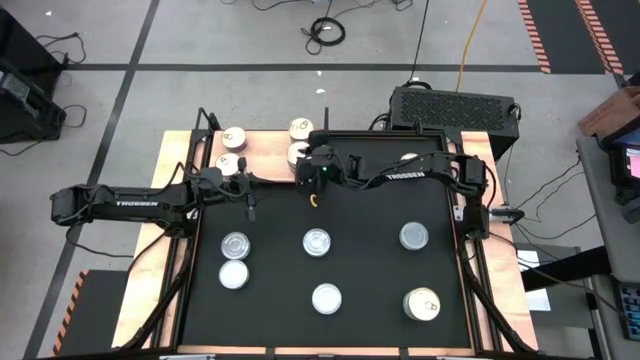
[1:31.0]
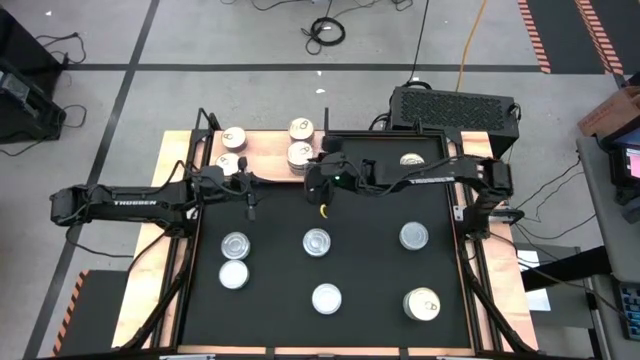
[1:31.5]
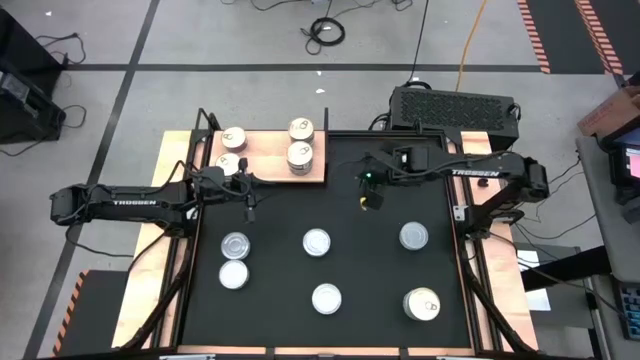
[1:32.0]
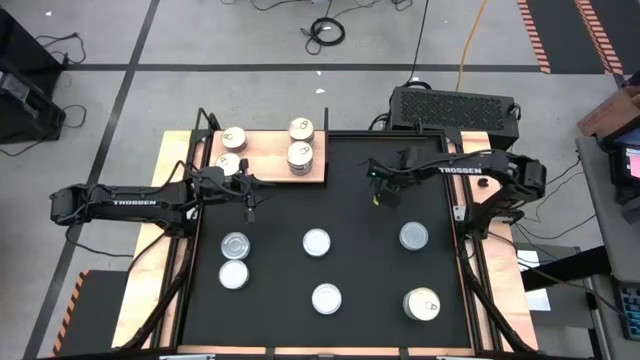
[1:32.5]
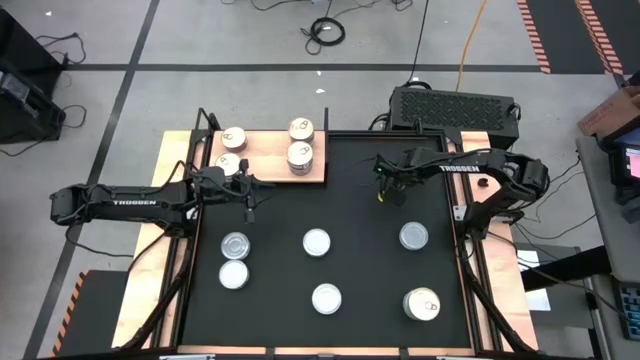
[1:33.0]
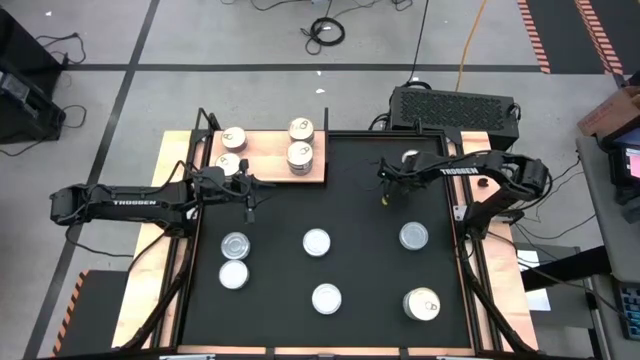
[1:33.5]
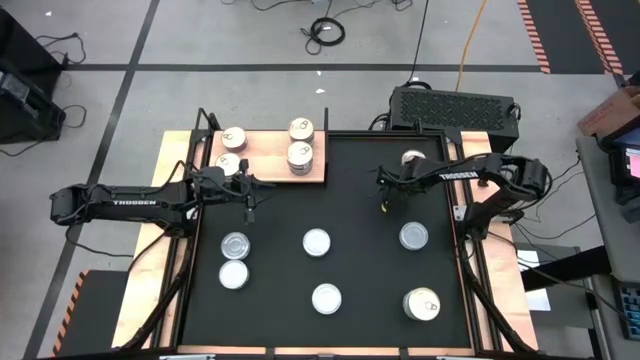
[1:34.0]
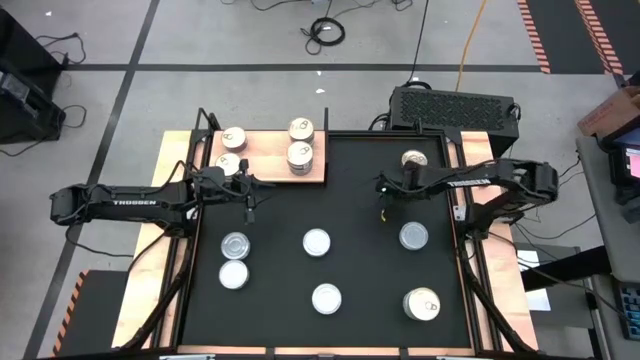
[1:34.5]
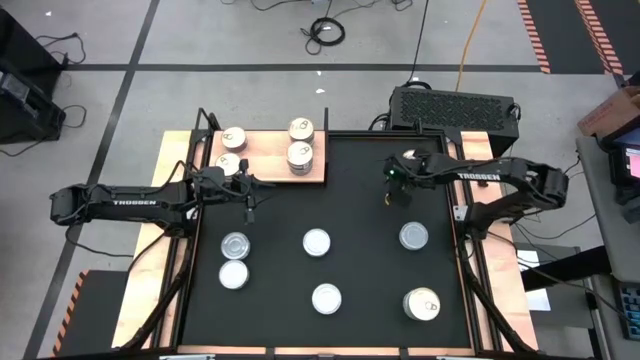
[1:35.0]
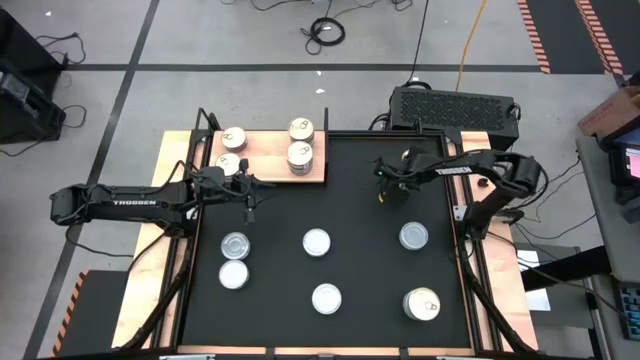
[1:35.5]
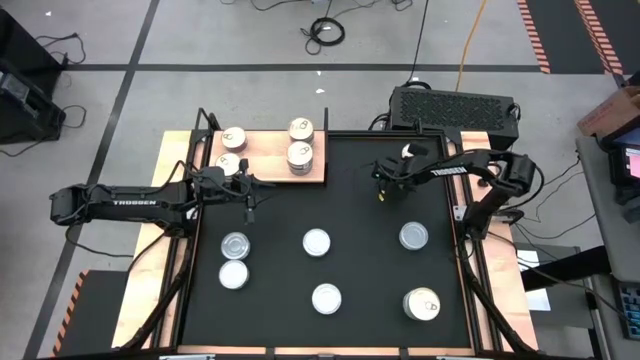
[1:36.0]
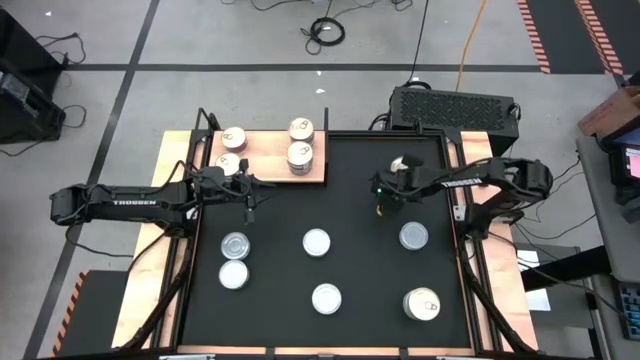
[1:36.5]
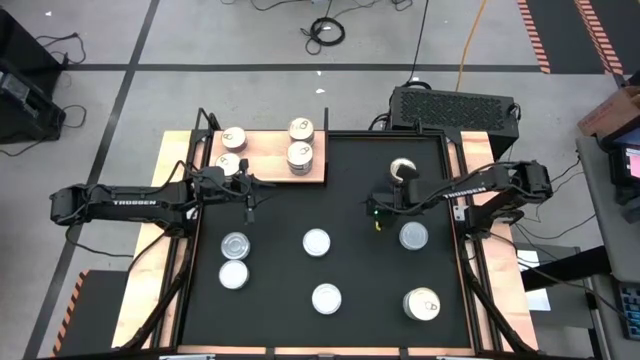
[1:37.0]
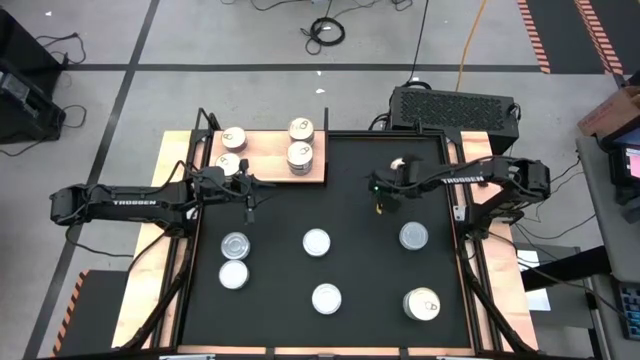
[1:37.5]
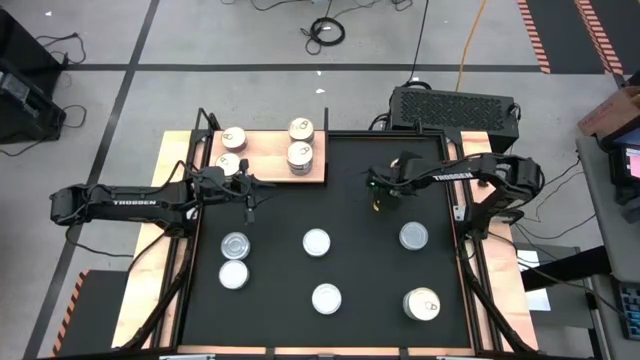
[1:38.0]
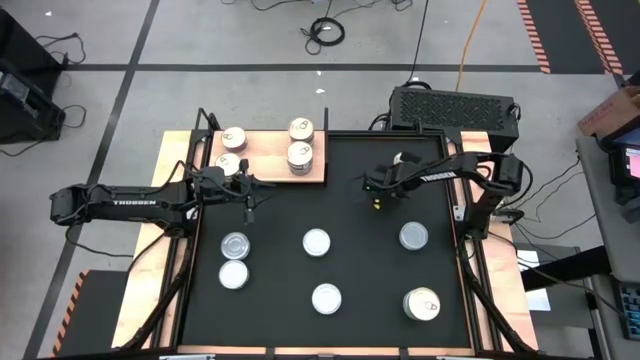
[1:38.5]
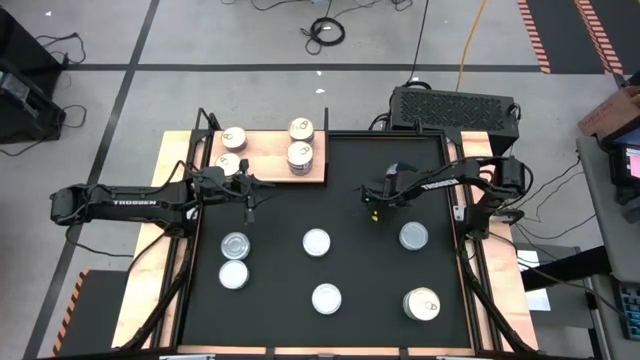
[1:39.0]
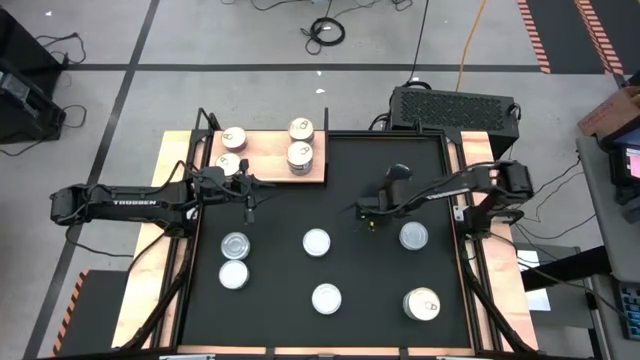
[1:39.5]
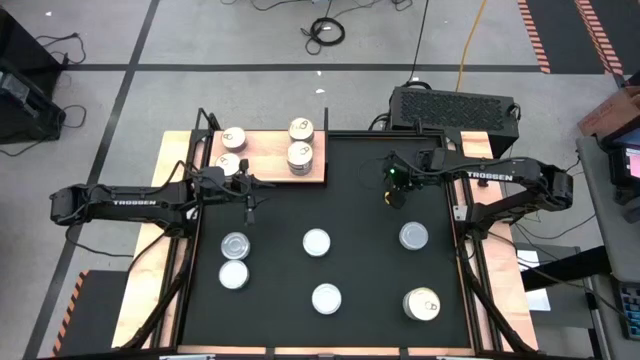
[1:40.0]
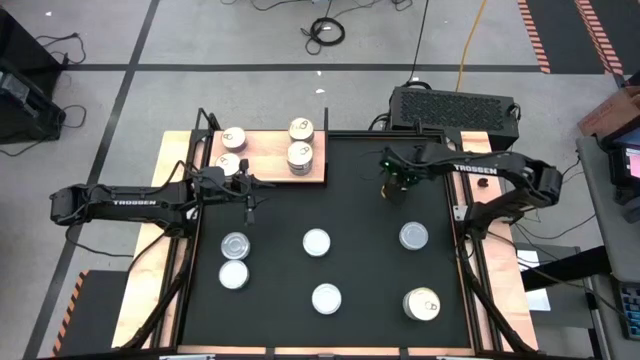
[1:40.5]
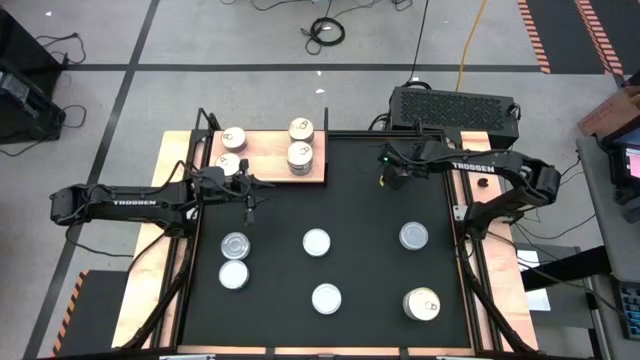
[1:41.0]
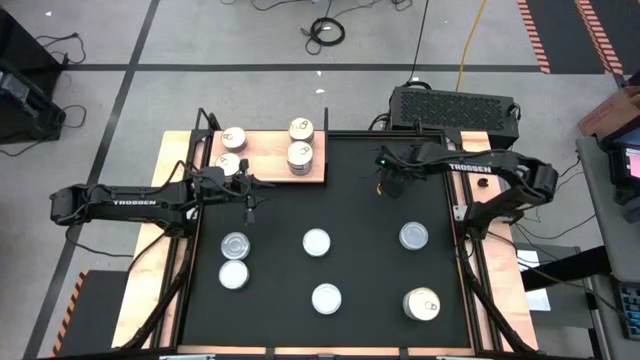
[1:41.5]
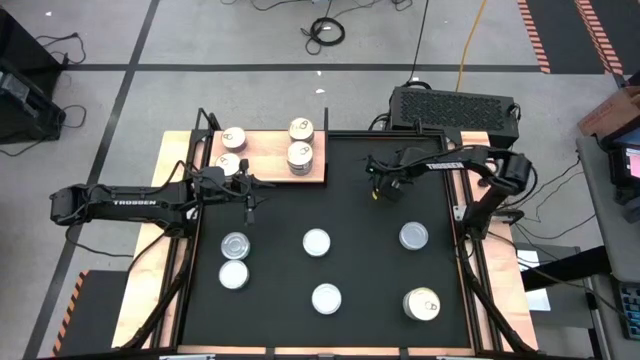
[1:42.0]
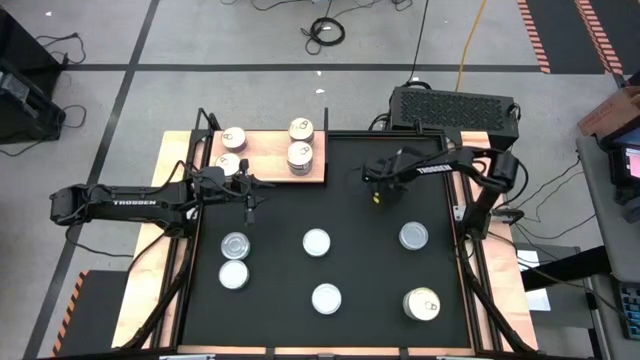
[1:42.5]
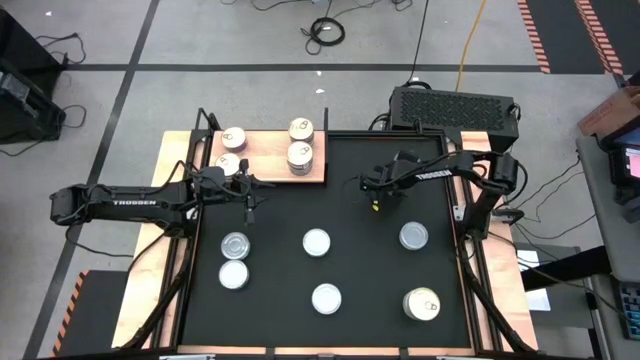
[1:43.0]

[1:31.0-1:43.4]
Task: Stack canned seafood by type on shelf
Stack the blue-pink tuna can on top of the other blue-pink tuna cans on the shelf

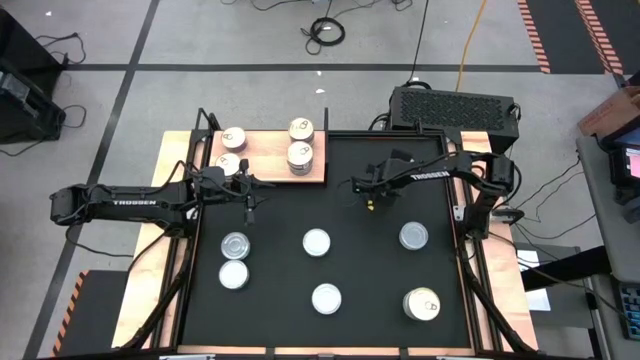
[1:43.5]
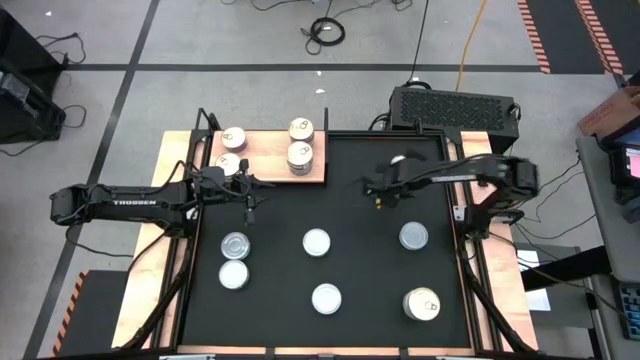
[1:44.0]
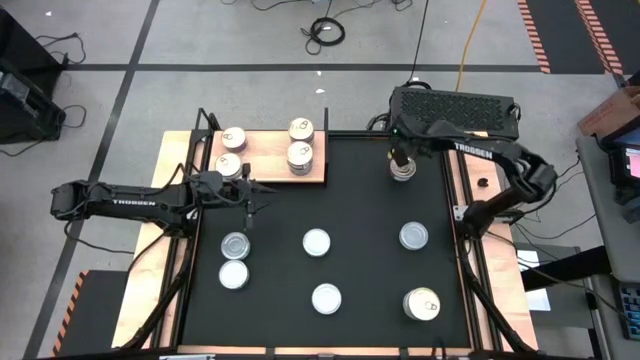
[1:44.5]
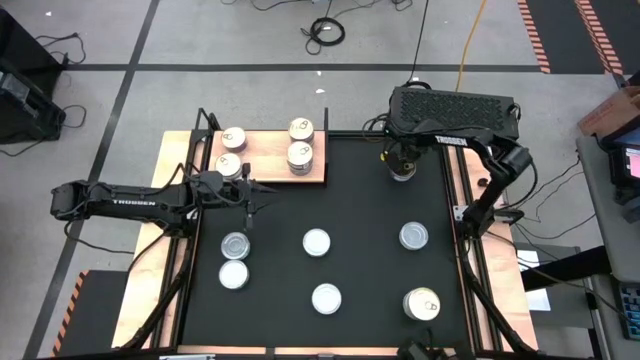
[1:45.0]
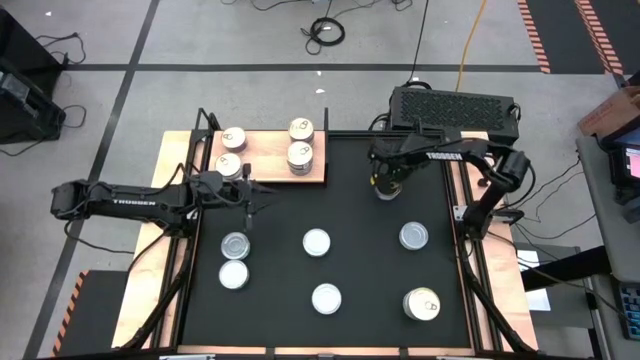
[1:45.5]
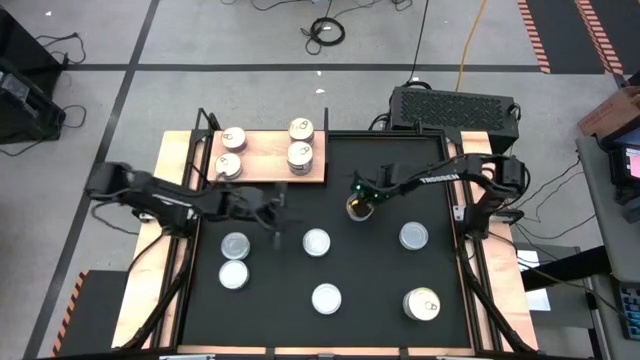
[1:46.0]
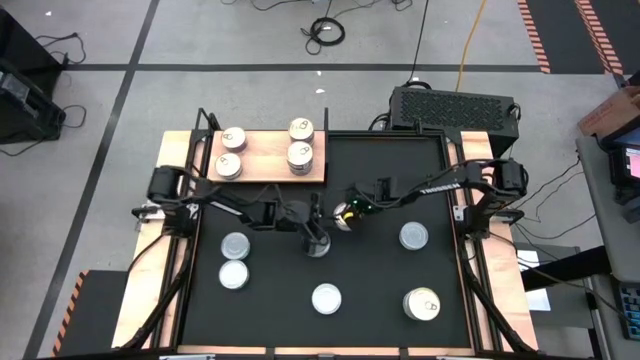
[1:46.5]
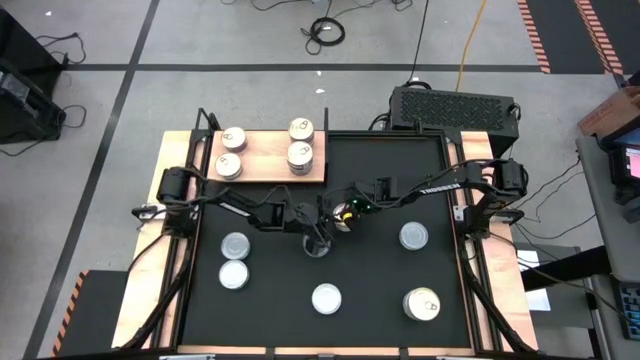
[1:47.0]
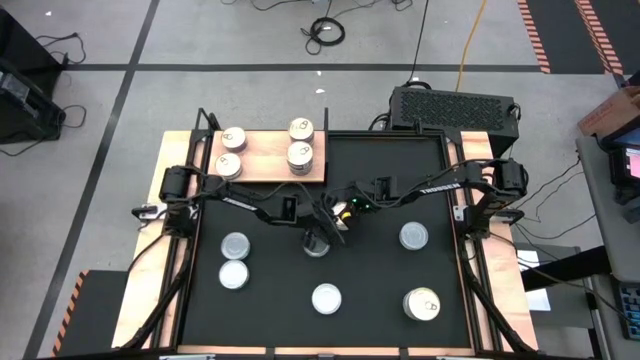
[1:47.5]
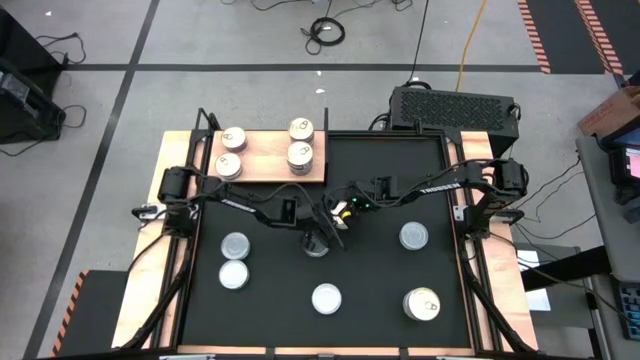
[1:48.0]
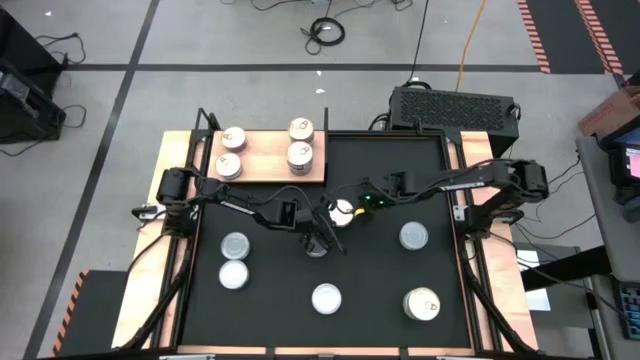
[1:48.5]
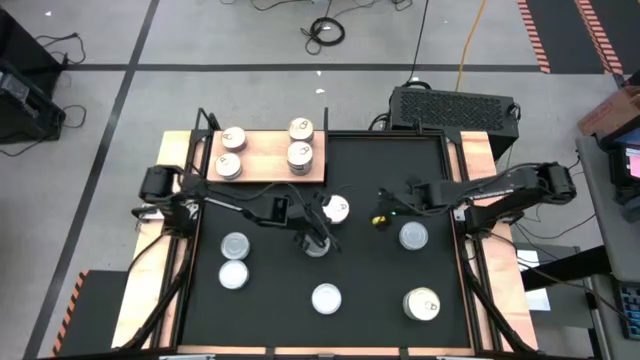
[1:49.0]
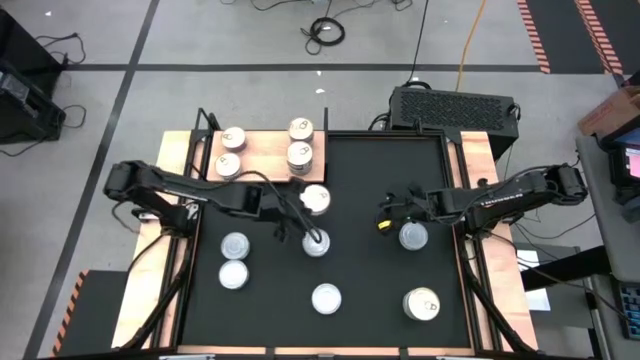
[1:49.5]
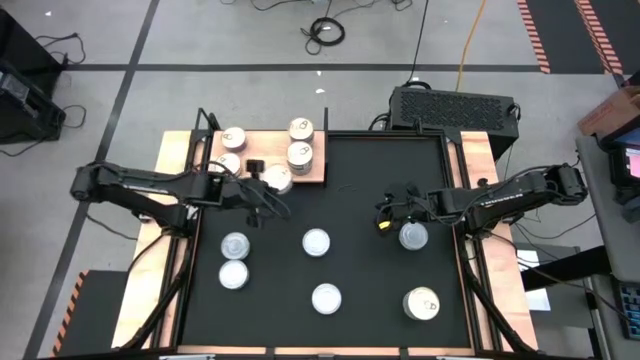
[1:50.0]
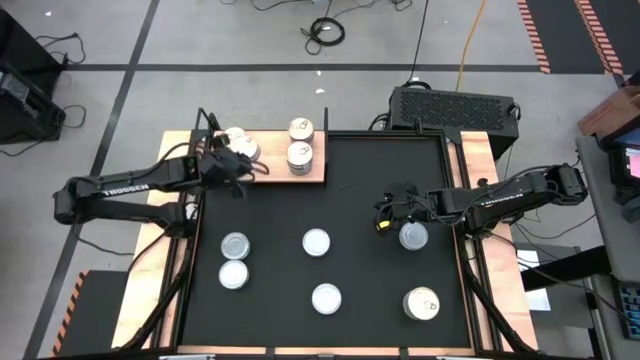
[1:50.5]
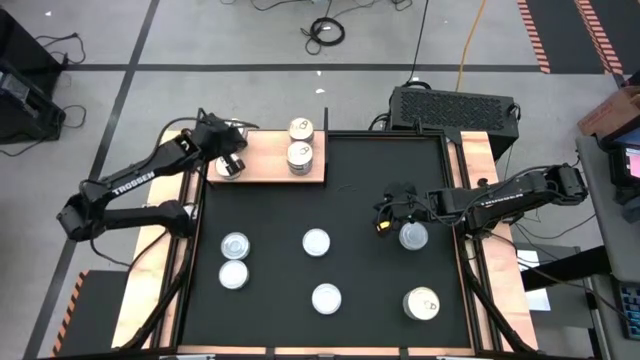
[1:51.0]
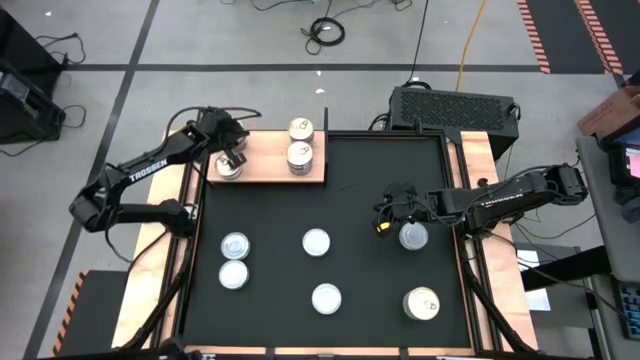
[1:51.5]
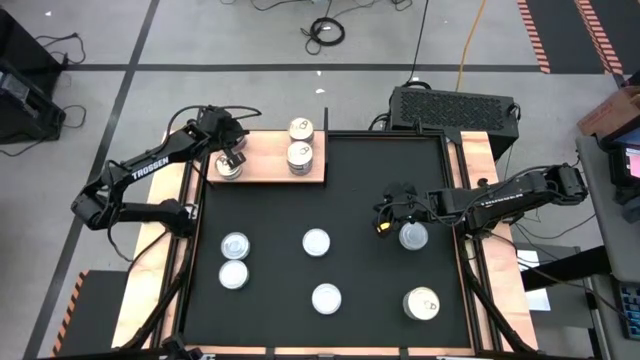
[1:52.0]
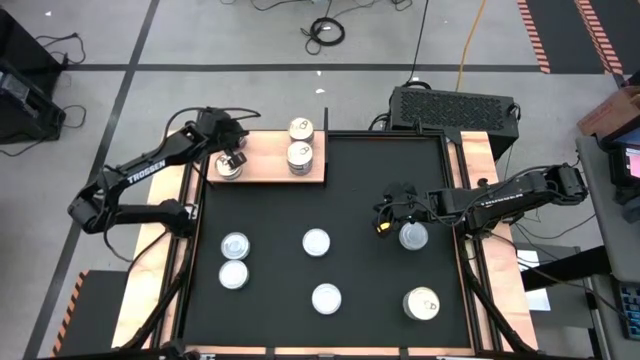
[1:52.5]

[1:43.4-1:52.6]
Stack the blue-pink tuna can on top of the other blue-pink tuna cans on the shelf

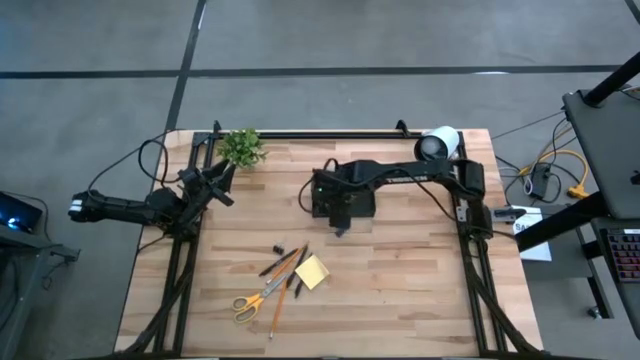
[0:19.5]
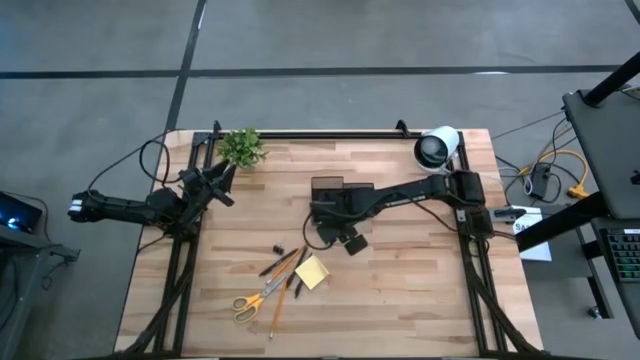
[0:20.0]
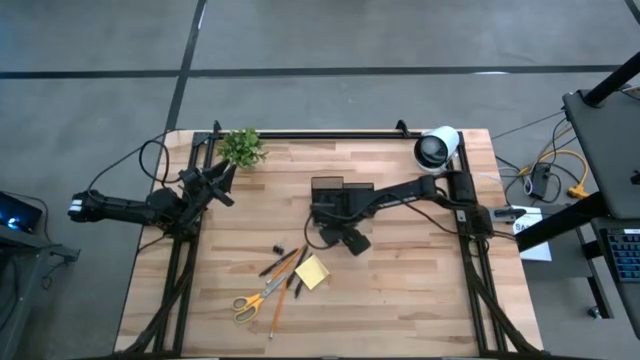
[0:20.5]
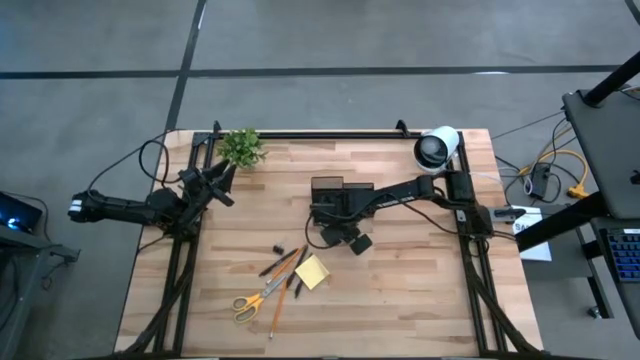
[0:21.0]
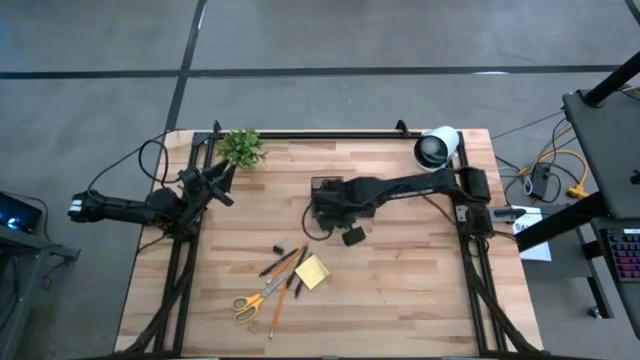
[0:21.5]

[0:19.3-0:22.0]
Task: Pick and place office supplies into organizer
Put the blue eraser into the black desk organizer
